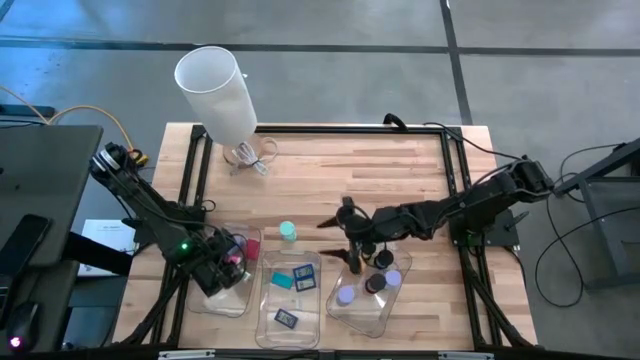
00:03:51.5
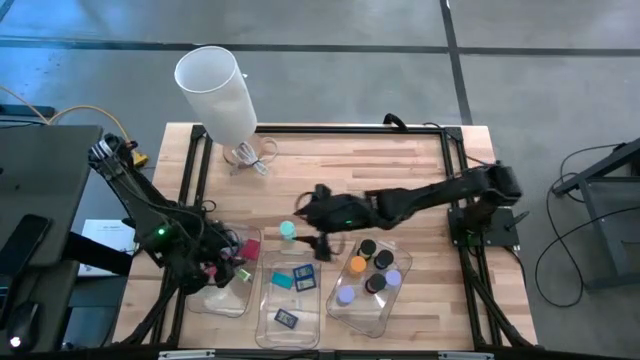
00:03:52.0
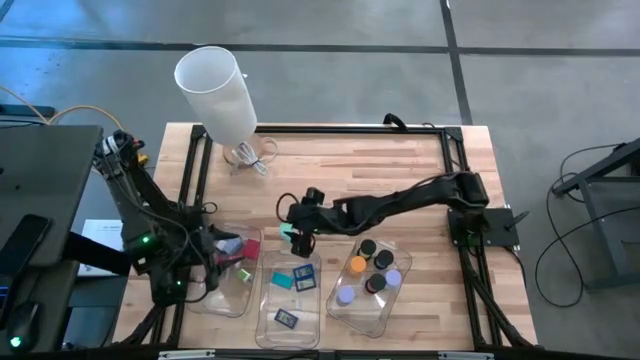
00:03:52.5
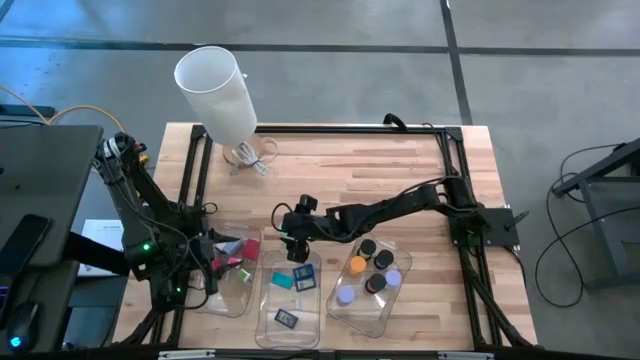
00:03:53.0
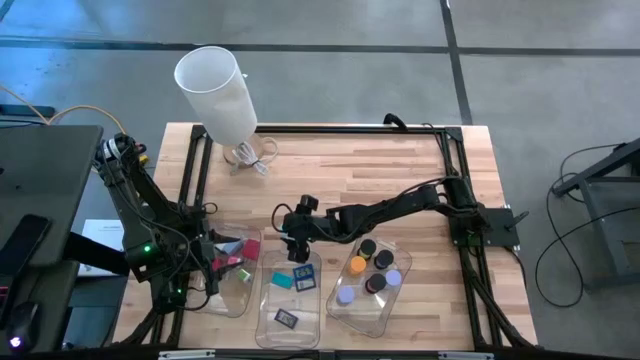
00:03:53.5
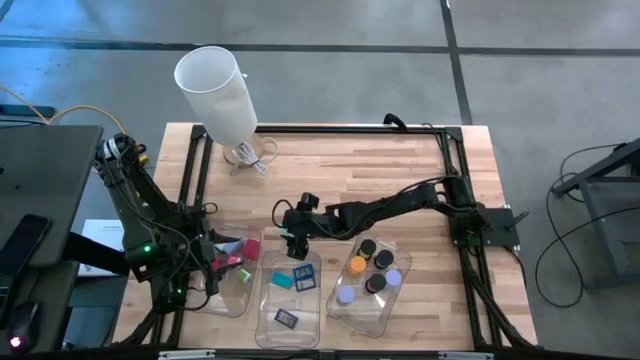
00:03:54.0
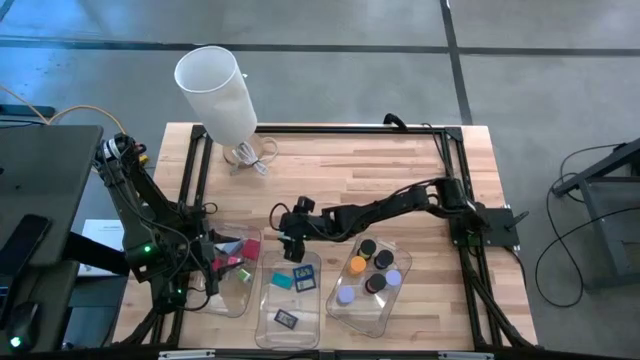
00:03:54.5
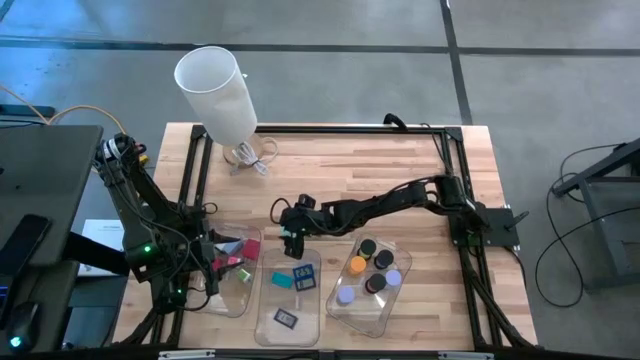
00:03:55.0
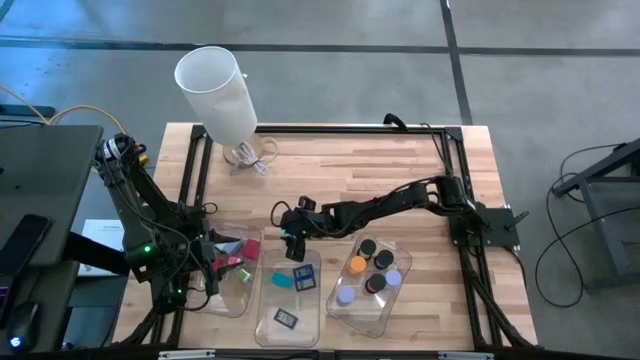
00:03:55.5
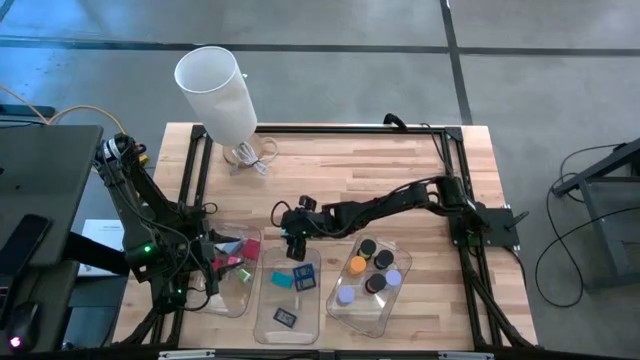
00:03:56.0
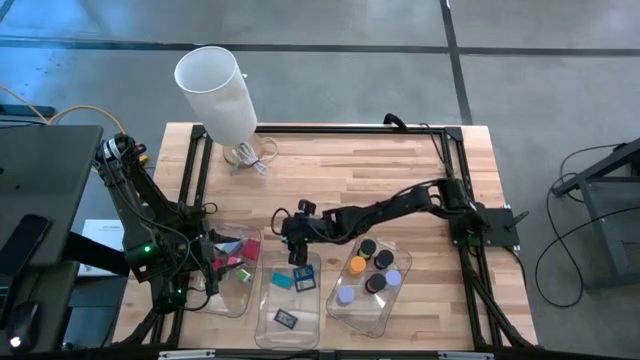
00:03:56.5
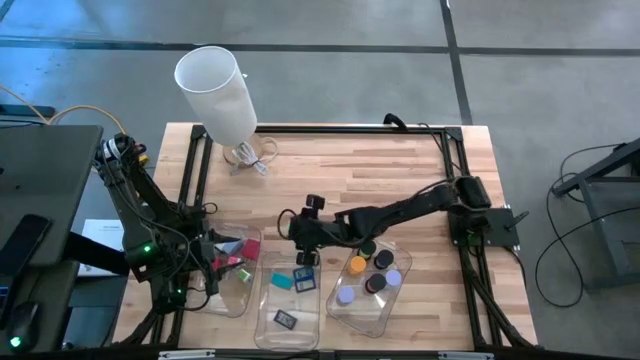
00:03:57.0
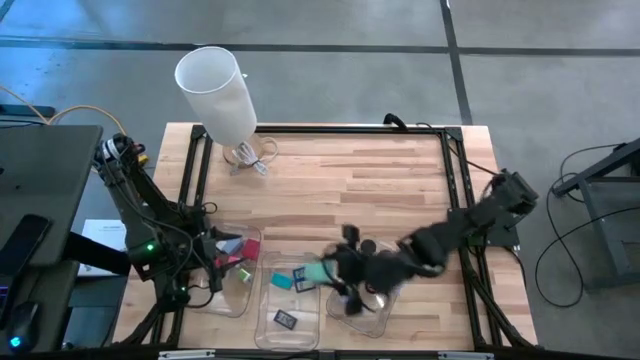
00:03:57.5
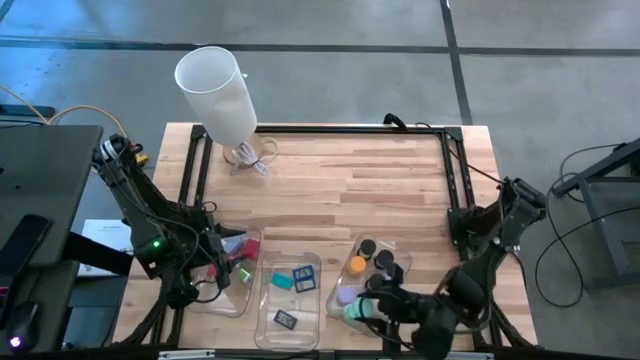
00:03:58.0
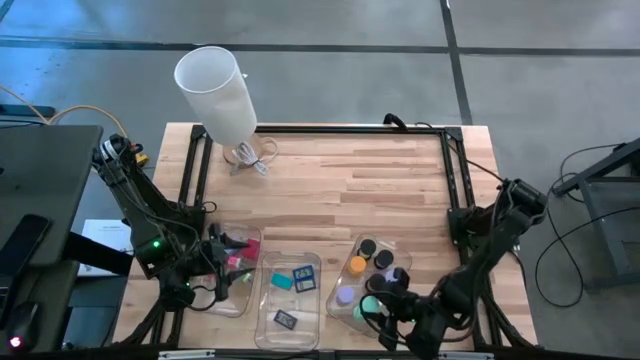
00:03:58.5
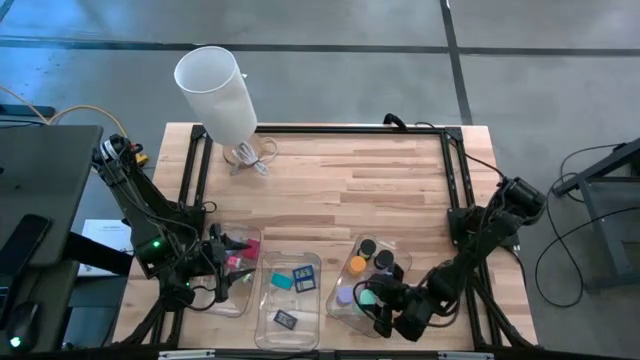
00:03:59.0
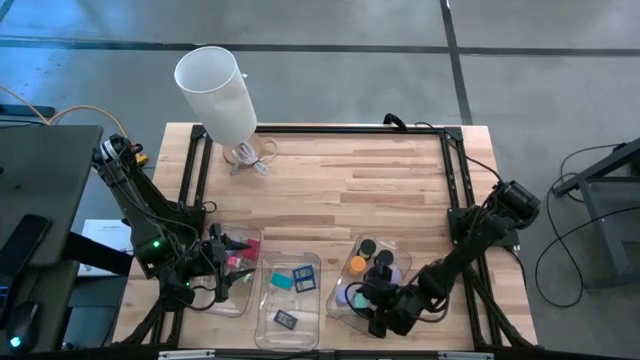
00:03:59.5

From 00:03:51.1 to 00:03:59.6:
Task: Pick & Place Office items
Put the light blue hourglass into the right bin

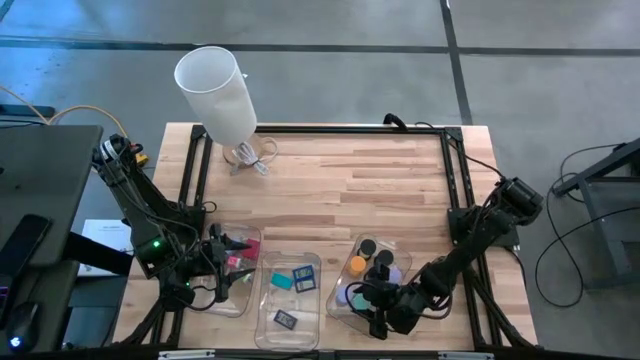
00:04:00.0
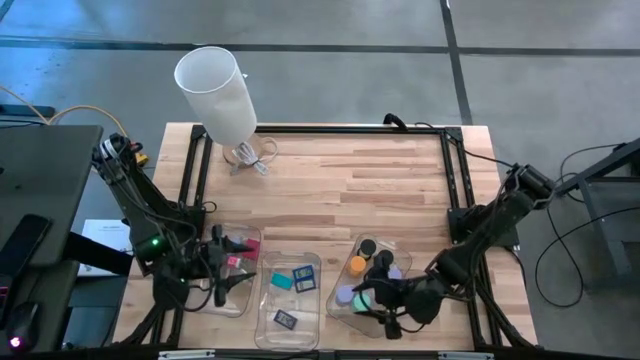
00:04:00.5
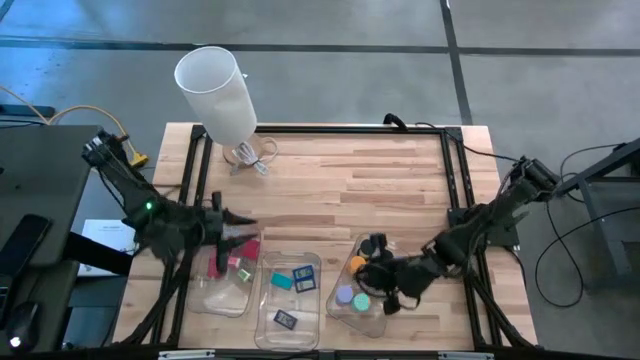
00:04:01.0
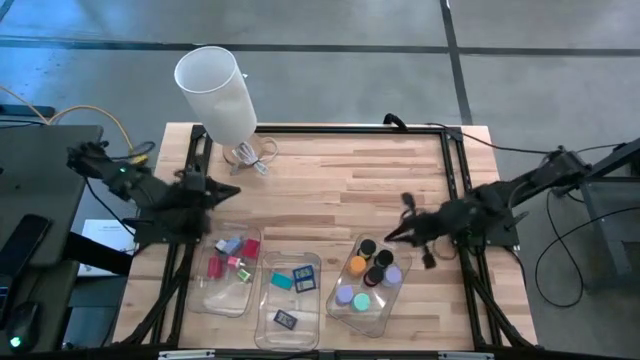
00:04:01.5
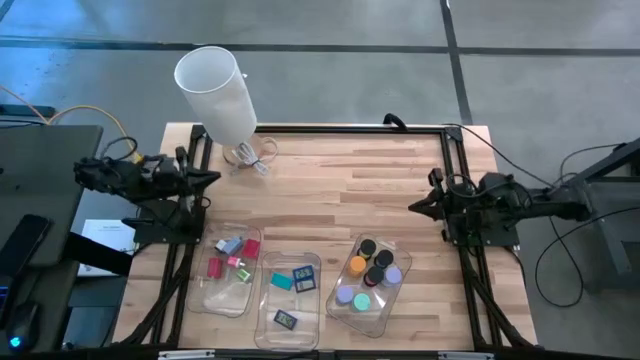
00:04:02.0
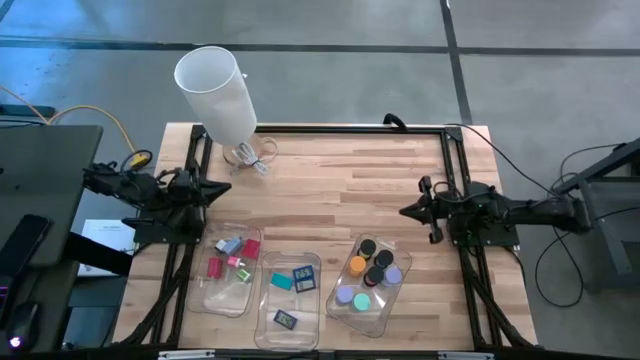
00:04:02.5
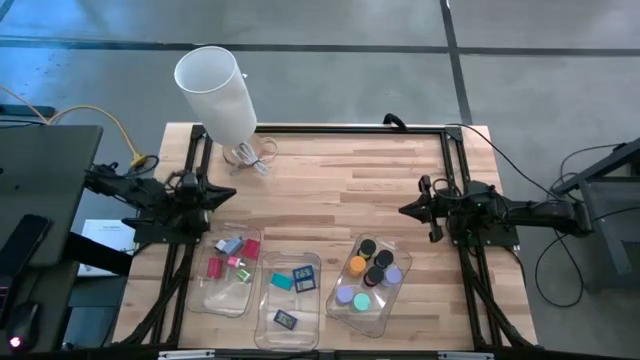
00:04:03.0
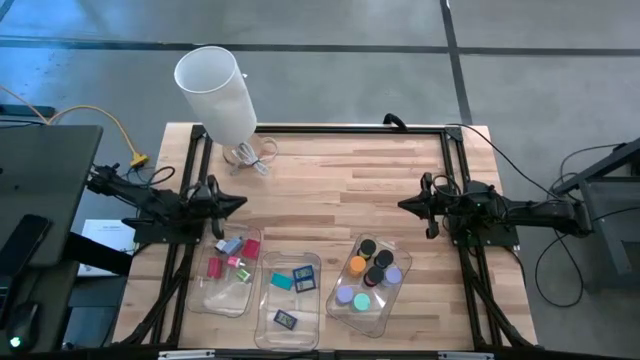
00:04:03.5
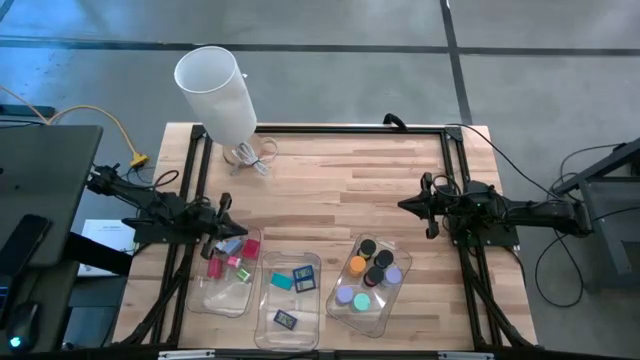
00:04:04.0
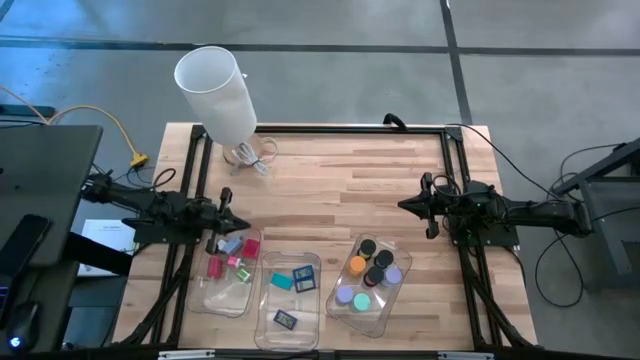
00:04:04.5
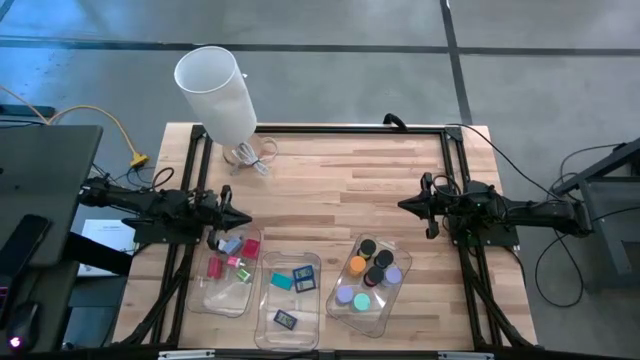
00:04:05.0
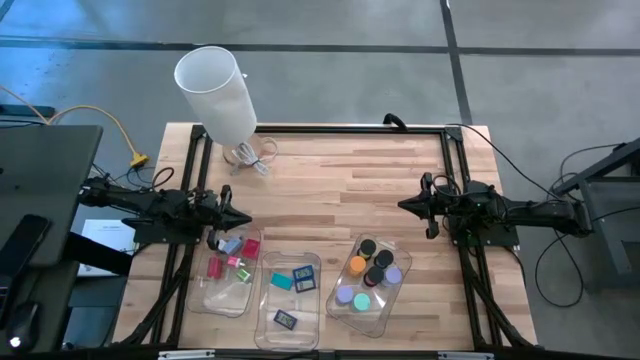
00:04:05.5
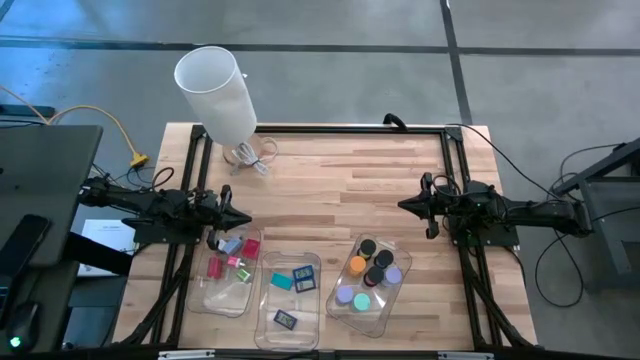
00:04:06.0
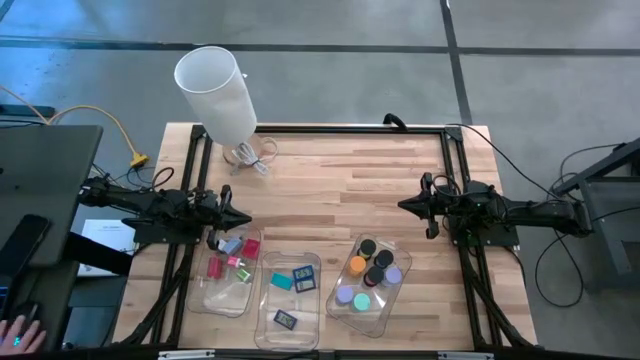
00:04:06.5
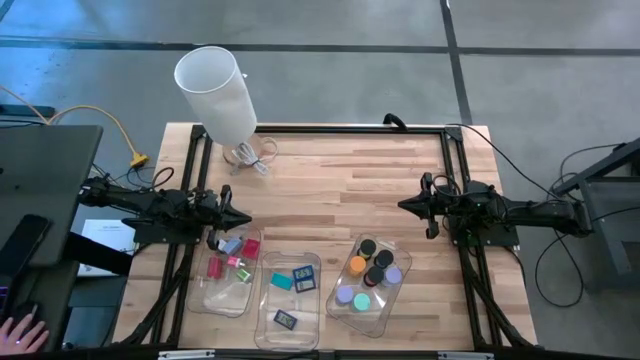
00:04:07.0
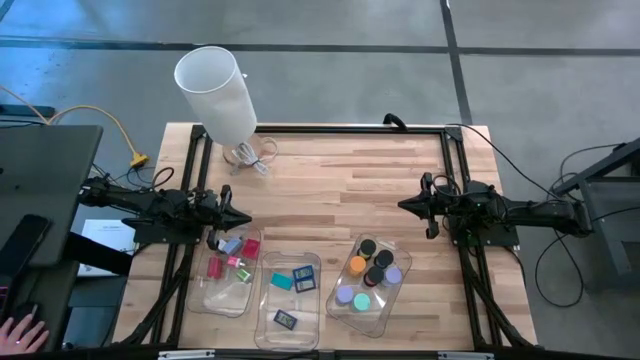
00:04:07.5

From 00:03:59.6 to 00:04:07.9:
Return to Home Position

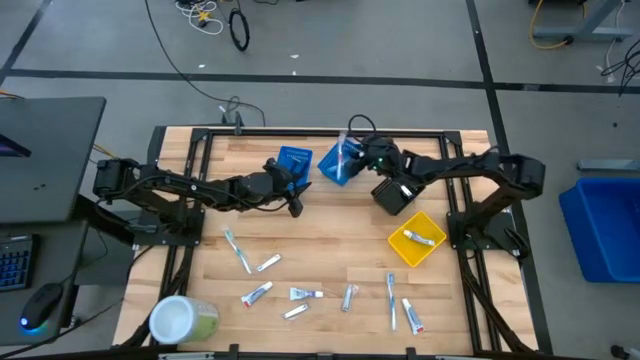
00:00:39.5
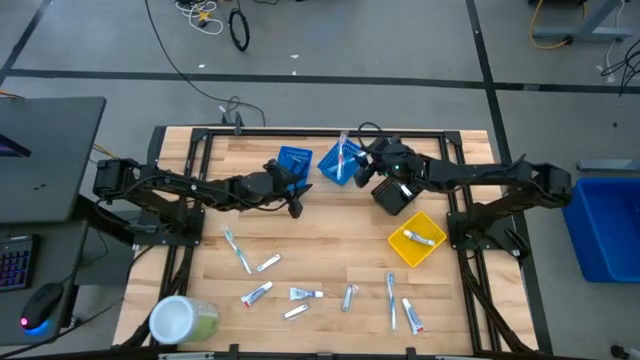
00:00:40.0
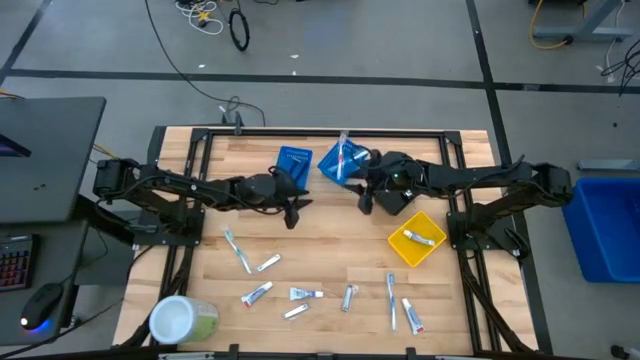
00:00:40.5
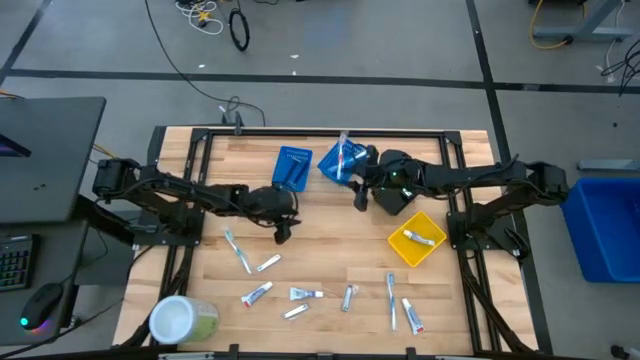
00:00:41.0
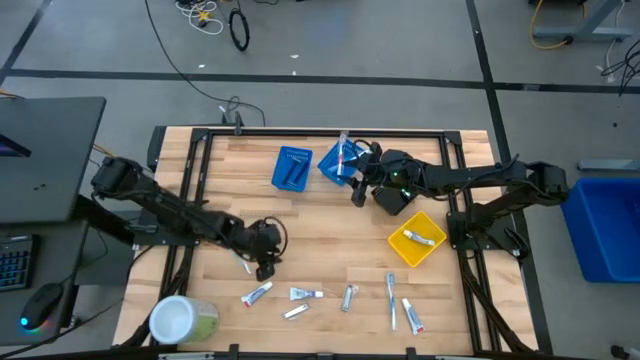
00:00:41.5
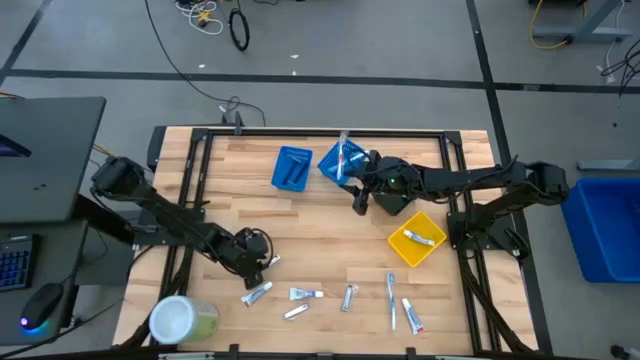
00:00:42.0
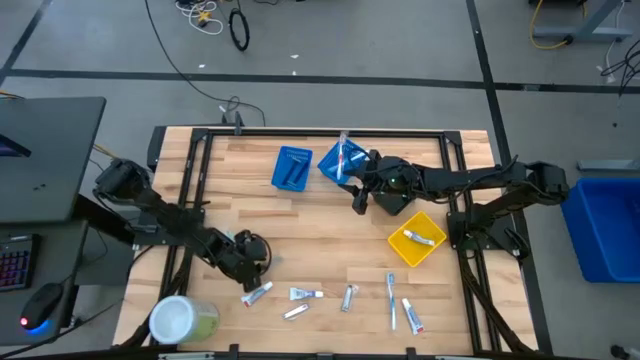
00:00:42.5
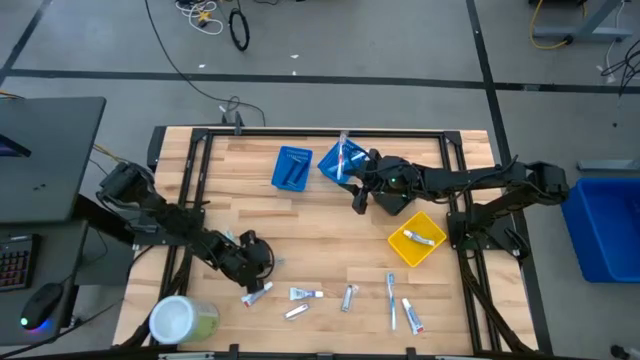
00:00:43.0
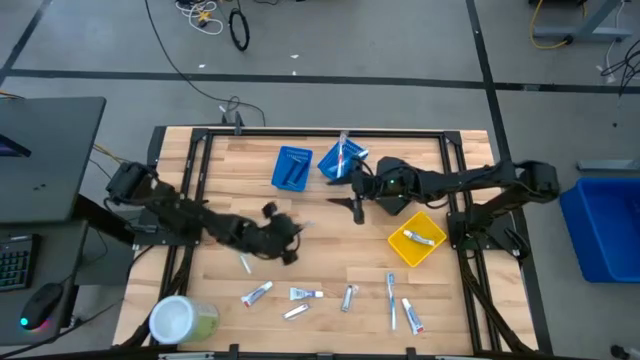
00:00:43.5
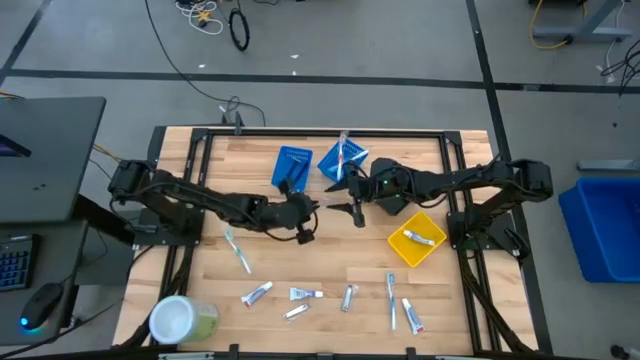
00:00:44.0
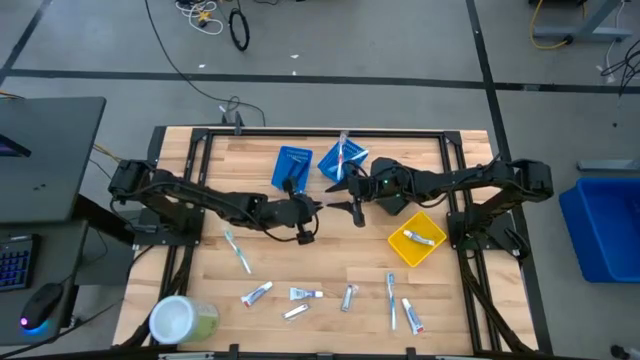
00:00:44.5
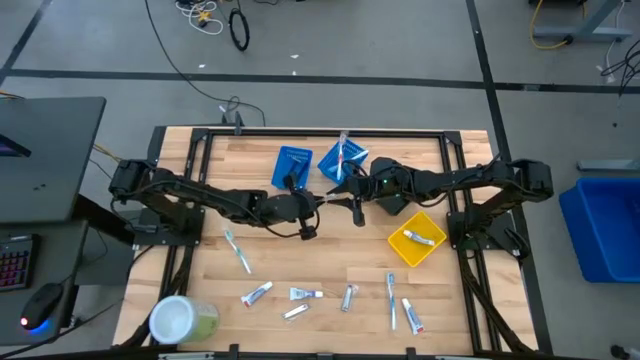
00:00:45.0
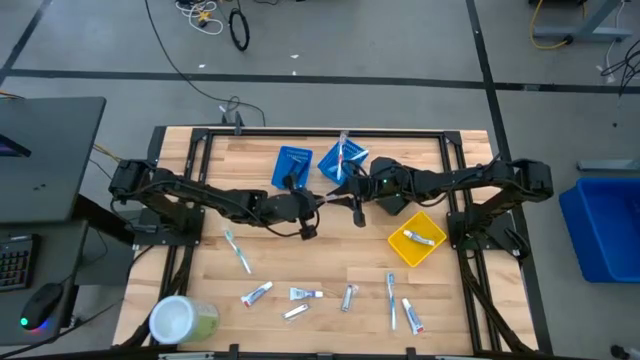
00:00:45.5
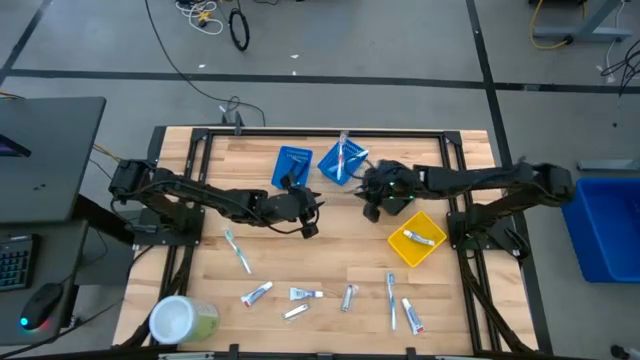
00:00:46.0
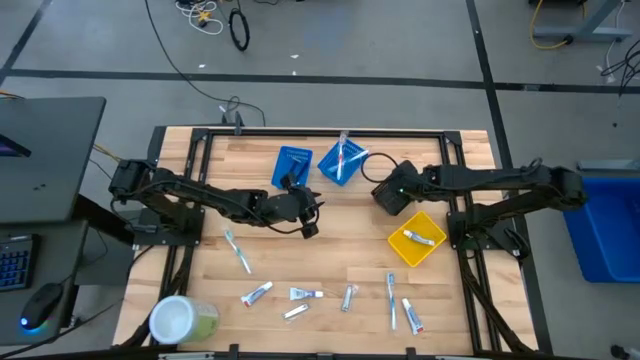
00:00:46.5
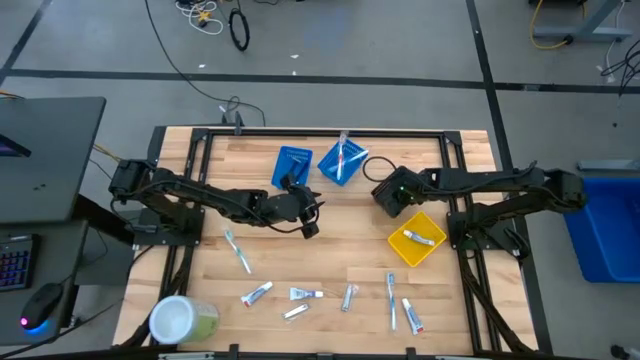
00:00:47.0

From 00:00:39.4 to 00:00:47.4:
Task: Pick & Place Travel size toiletries
Put the silver nail cutter into the black basket
